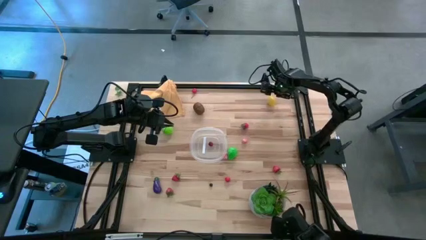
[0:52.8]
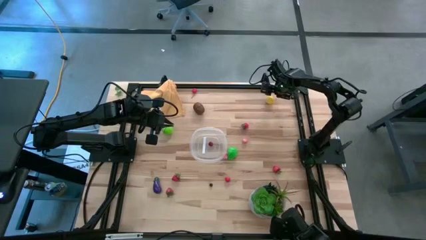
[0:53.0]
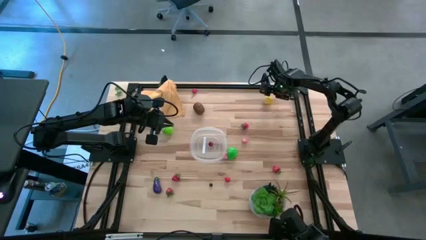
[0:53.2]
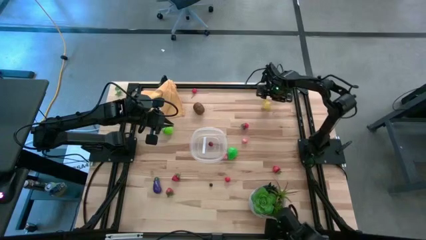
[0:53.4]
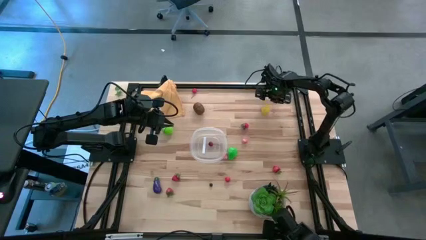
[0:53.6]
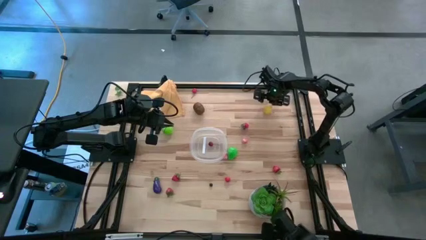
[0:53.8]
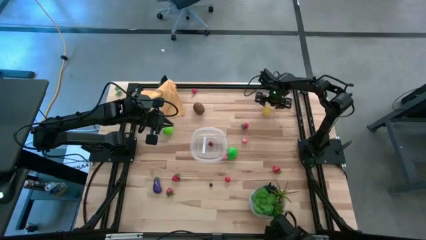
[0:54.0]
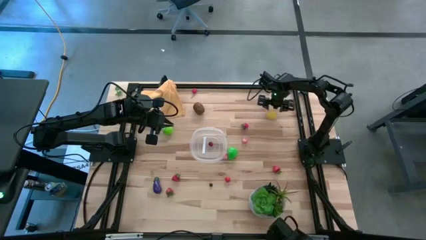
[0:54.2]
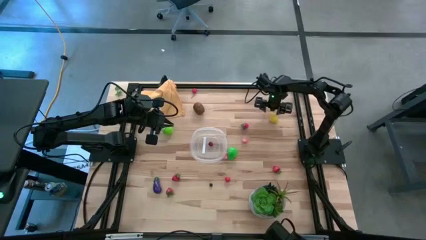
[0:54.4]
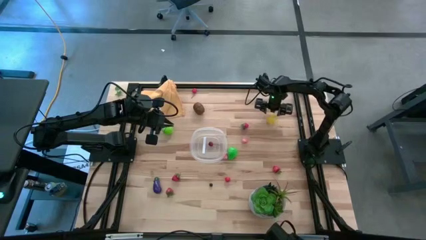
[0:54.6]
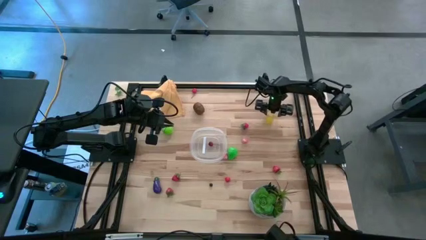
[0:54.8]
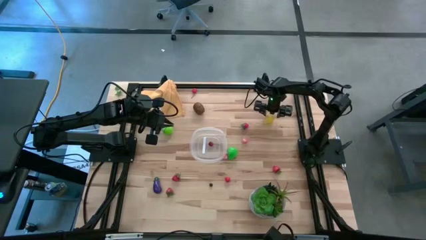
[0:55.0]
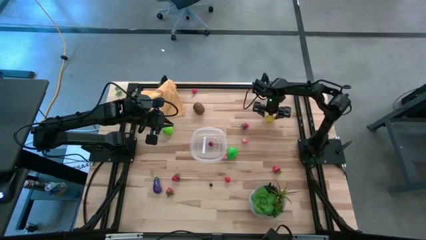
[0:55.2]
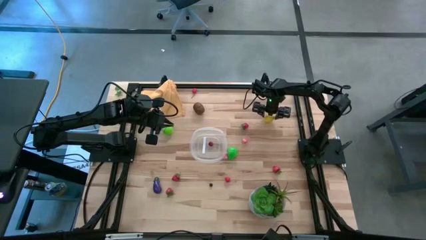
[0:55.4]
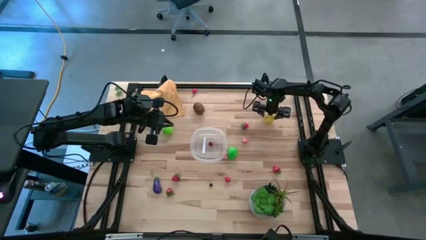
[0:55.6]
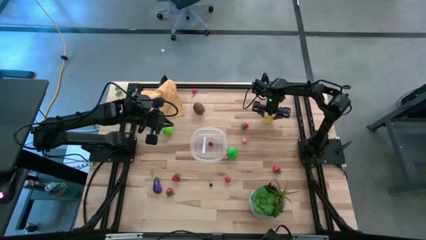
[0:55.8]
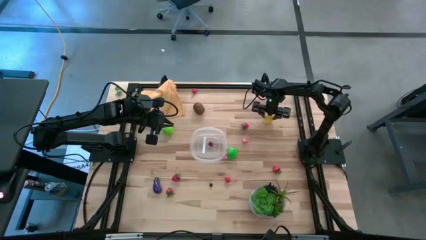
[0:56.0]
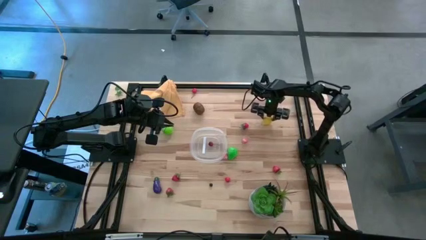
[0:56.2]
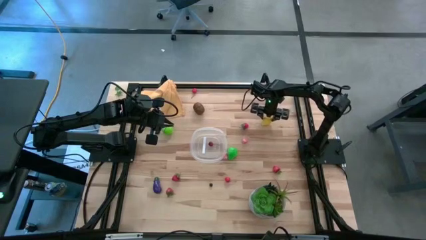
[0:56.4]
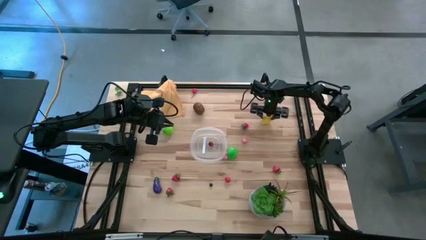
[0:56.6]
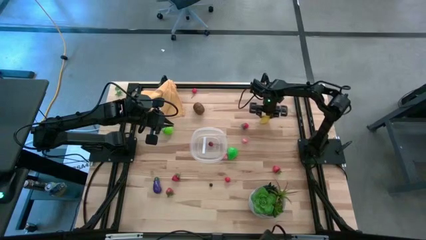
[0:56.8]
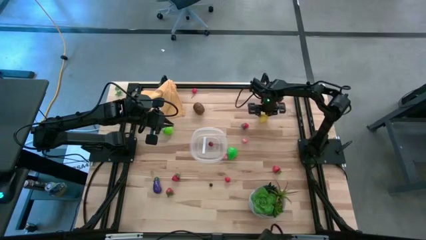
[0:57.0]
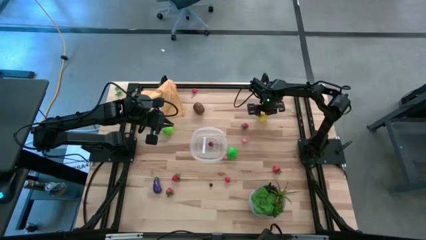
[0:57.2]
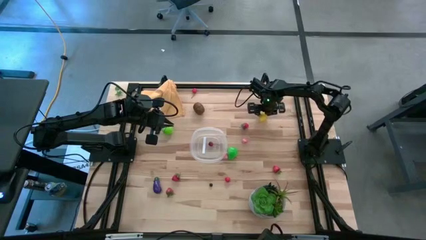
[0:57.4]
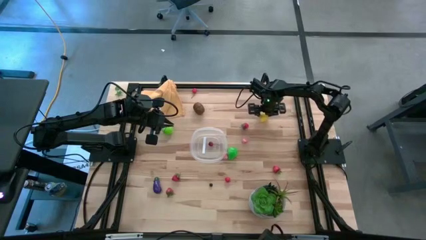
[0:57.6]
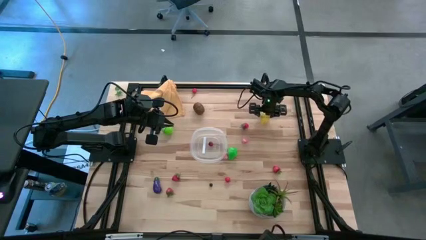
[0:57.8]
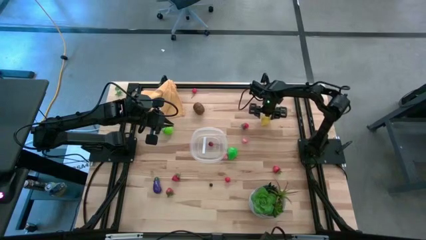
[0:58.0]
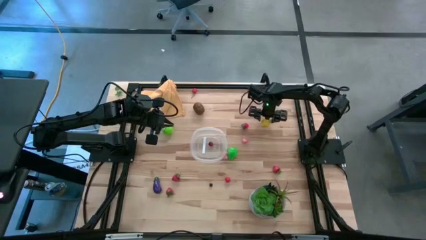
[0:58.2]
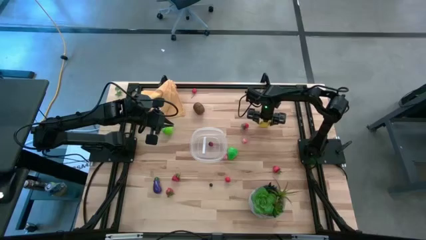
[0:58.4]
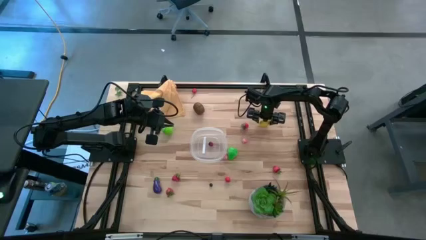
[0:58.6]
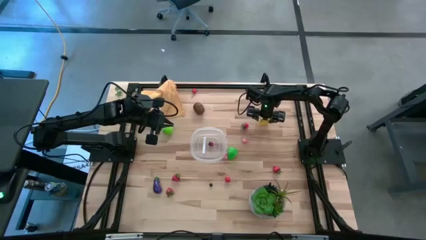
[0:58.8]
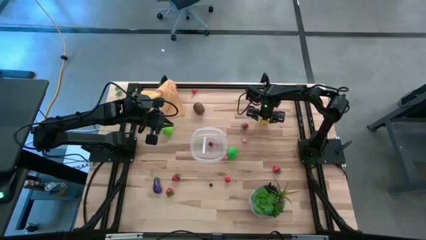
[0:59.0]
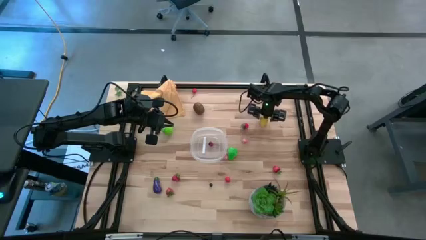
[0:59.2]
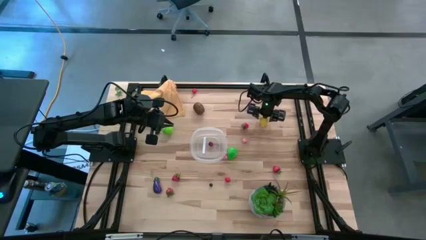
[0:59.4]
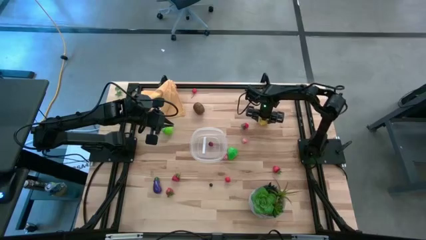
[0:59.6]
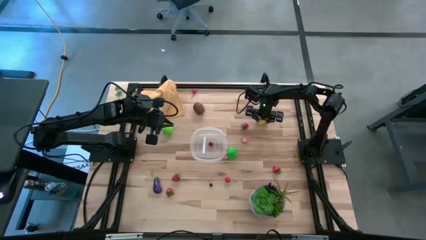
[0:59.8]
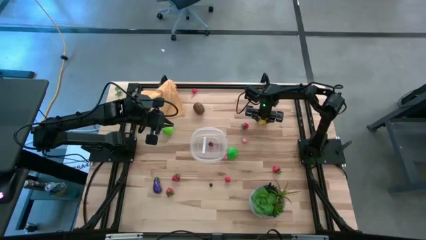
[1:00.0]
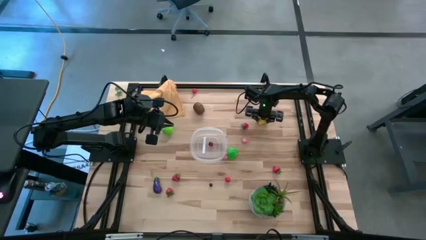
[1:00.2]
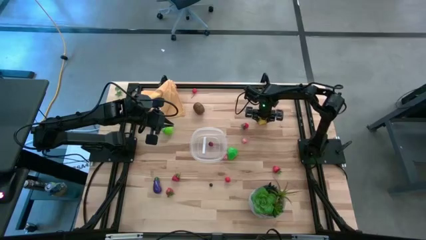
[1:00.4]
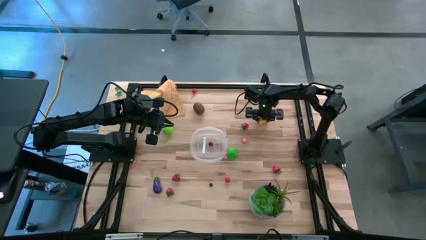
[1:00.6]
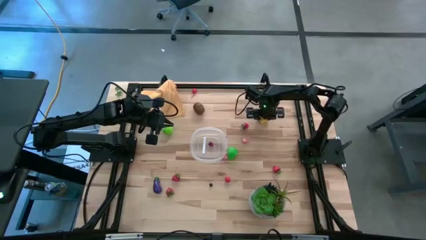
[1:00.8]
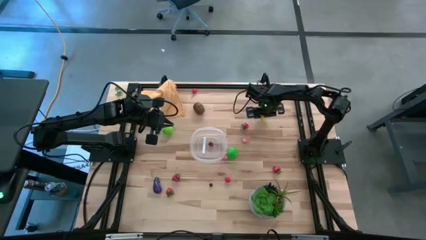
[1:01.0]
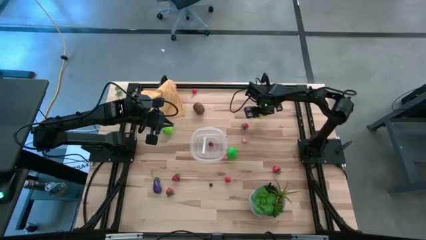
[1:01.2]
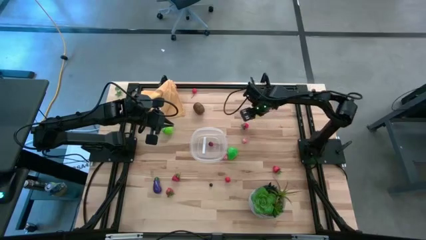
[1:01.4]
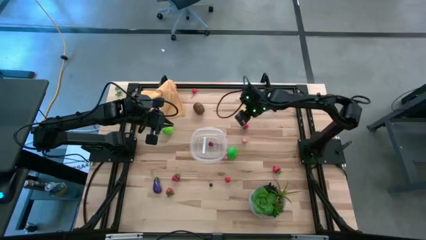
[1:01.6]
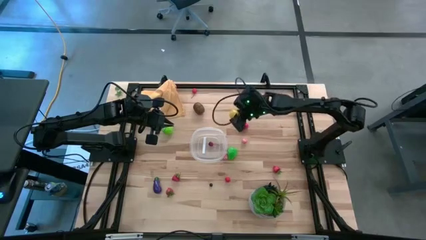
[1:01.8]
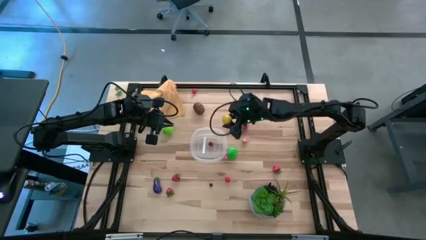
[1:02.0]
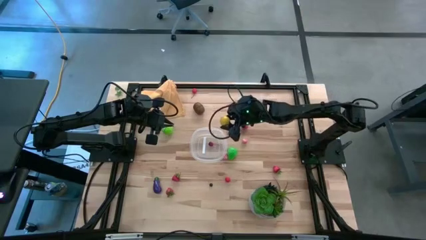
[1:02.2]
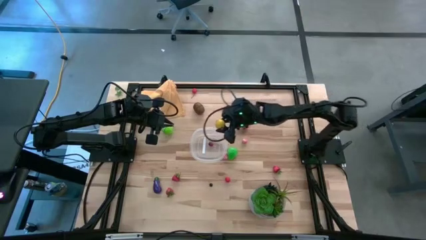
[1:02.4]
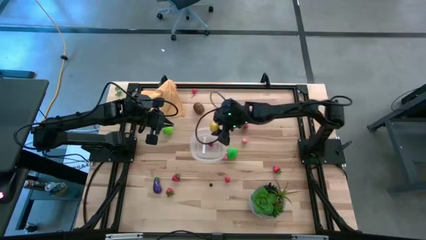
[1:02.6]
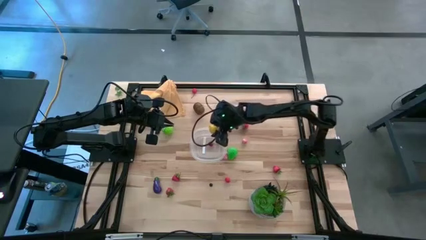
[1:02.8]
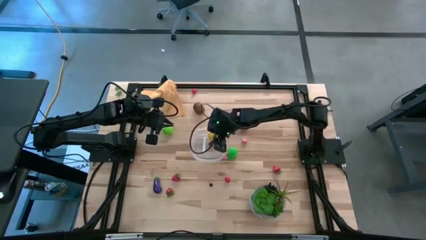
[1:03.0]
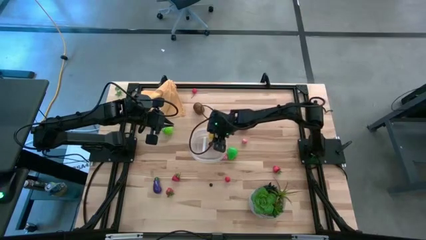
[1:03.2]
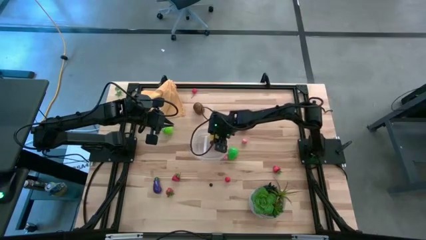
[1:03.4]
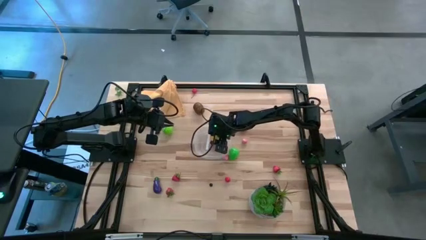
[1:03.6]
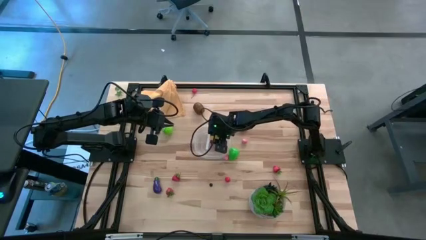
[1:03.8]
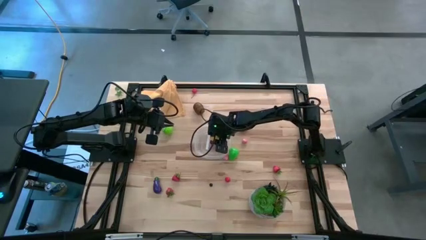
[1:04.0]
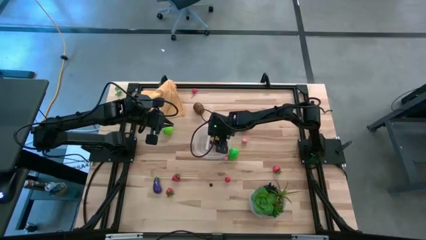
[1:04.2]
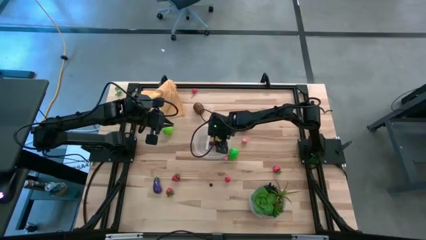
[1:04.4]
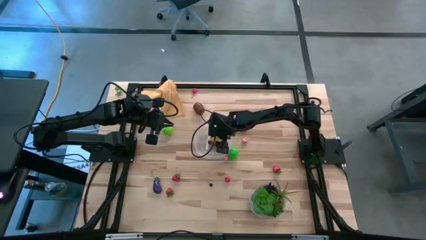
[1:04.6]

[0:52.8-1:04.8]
Task: Pick and placing Produce into tupperware
Put the lemon into the transparent bin

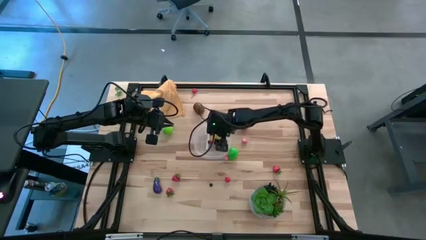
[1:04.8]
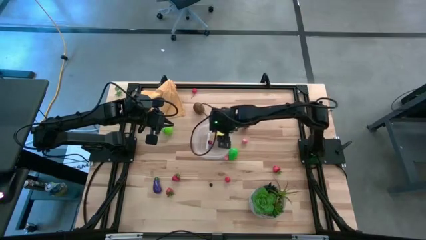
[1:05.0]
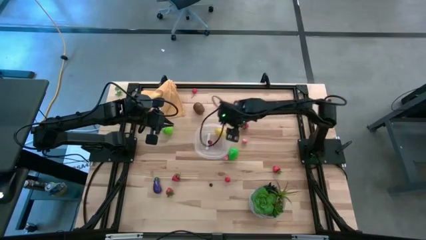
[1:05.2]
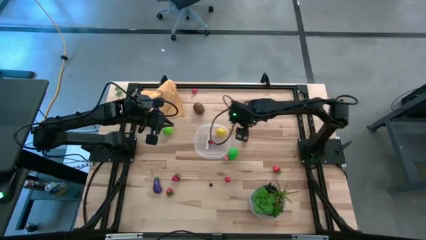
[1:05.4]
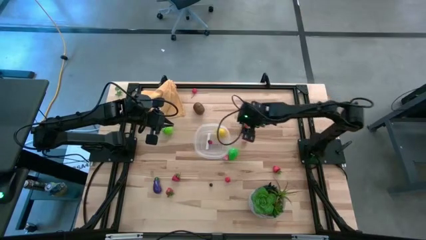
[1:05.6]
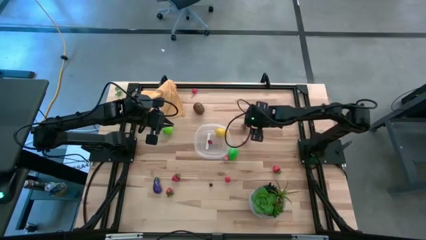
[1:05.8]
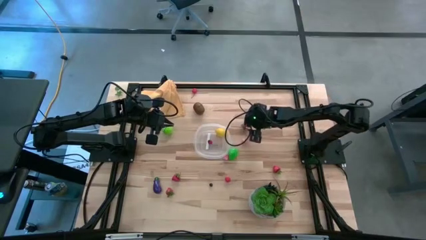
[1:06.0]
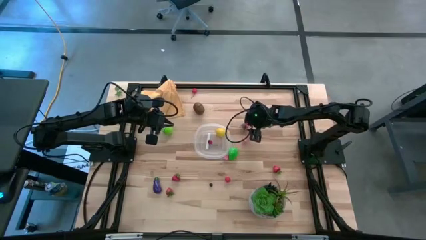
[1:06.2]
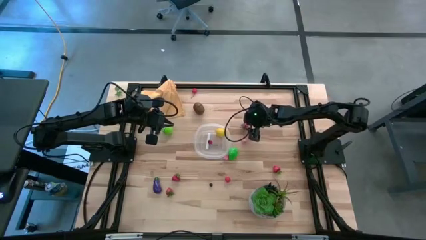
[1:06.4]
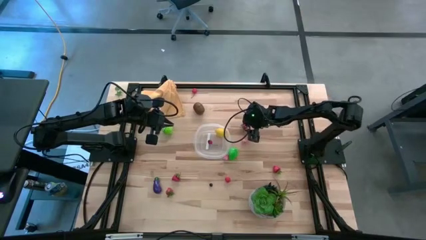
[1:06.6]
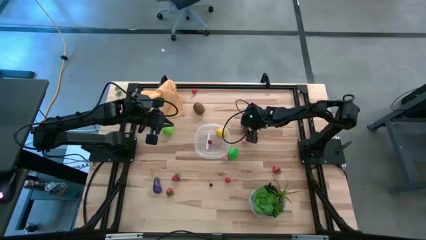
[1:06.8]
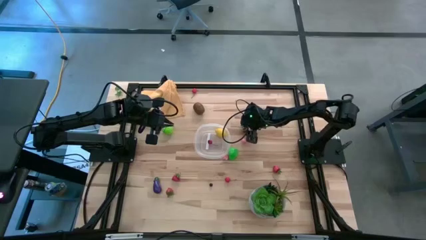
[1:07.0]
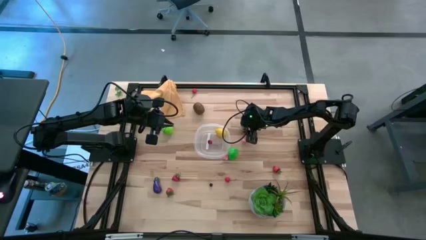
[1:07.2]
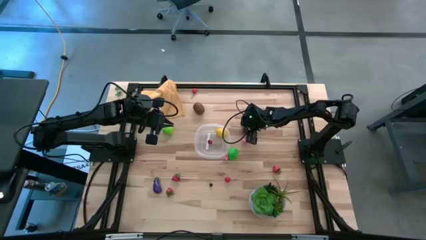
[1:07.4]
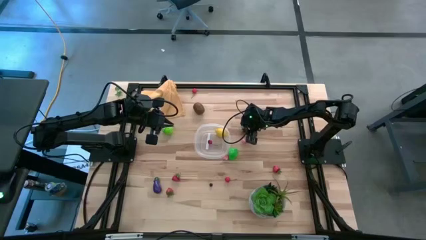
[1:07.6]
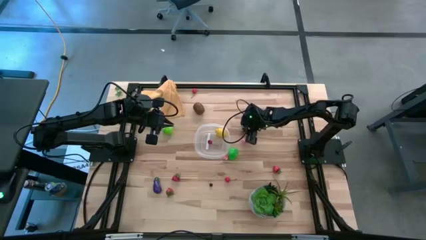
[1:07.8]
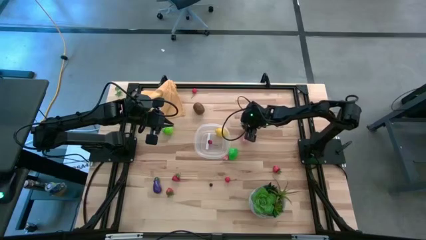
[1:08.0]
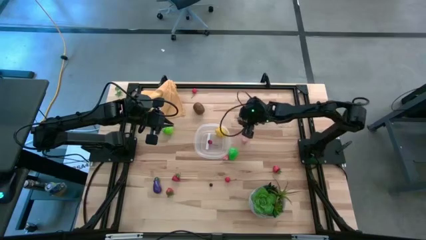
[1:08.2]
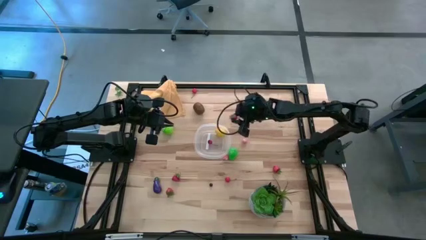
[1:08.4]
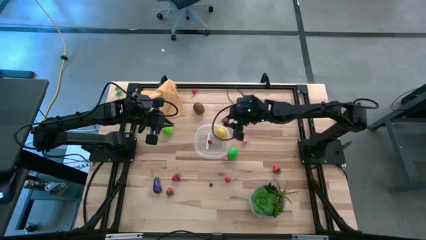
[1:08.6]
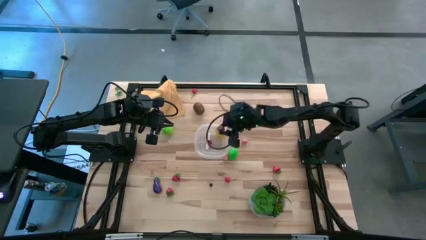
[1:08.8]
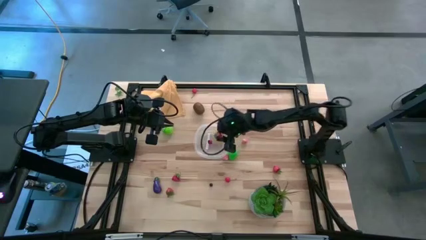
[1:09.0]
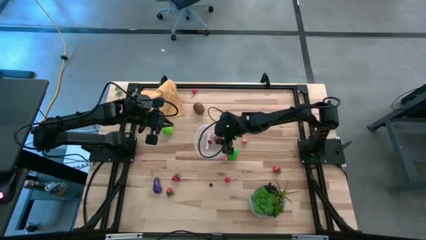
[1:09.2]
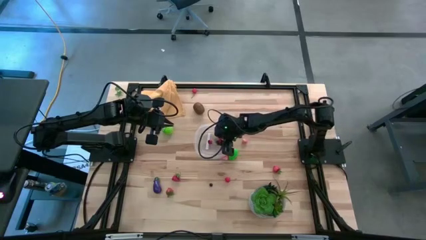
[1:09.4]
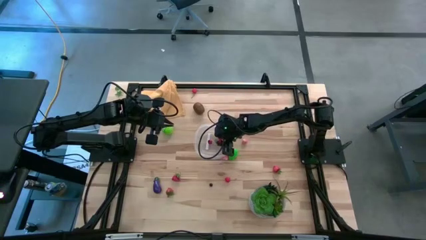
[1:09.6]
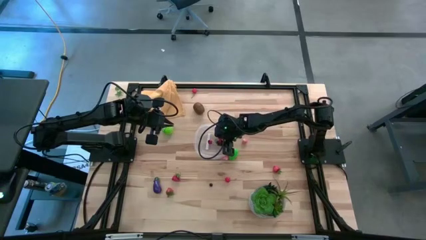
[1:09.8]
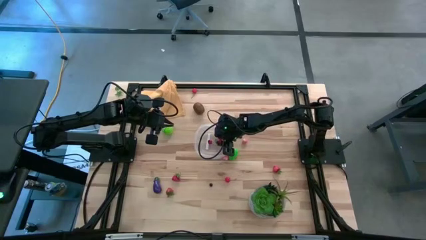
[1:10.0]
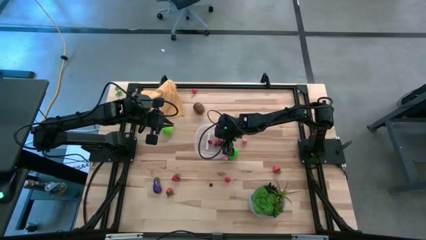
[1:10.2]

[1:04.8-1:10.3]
Put the top strawberry into the transparent bin
